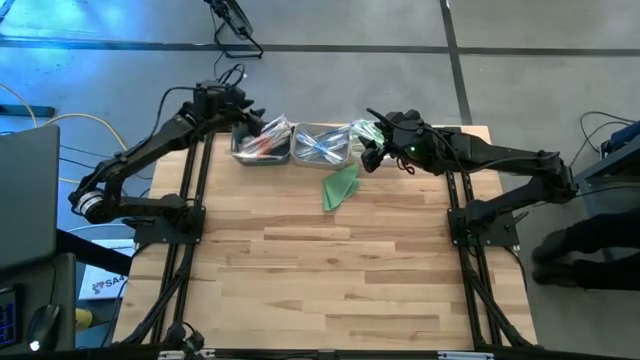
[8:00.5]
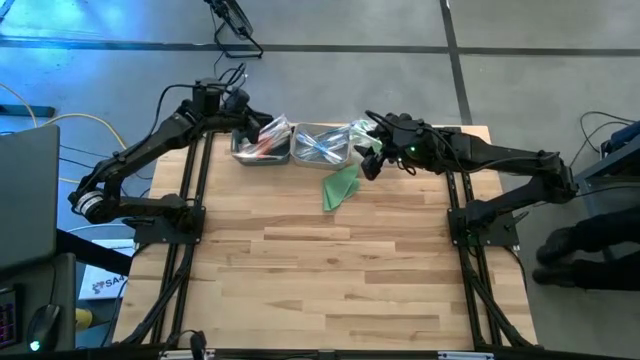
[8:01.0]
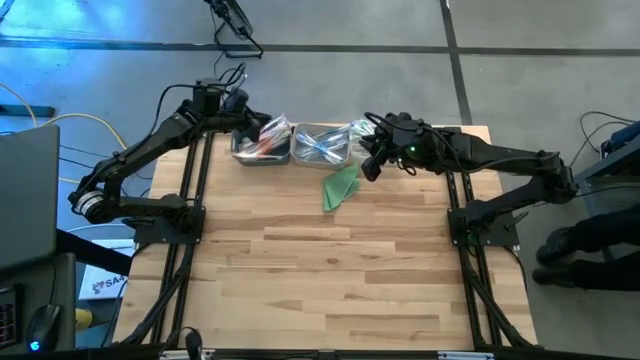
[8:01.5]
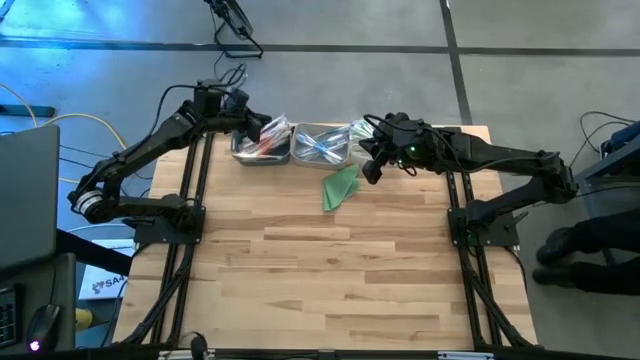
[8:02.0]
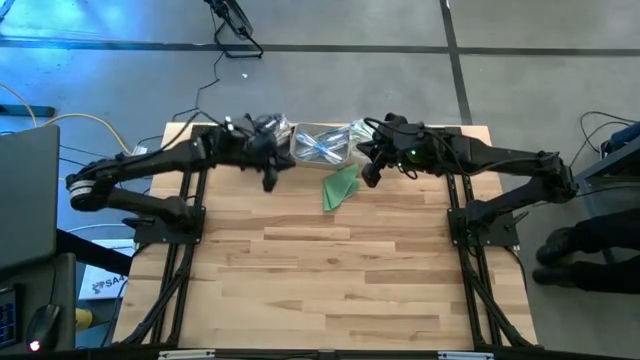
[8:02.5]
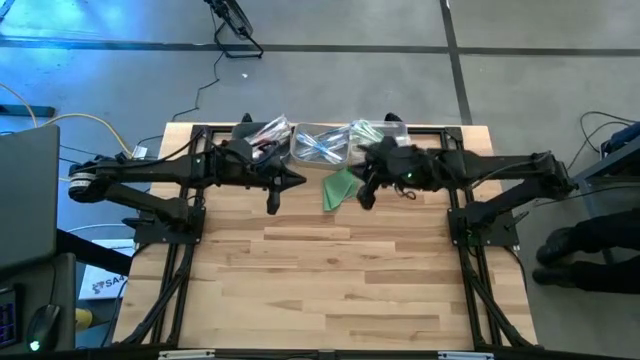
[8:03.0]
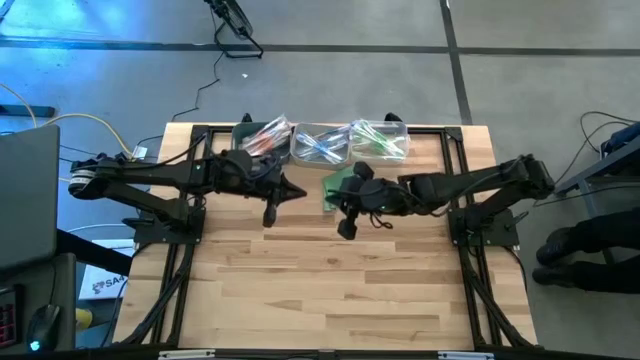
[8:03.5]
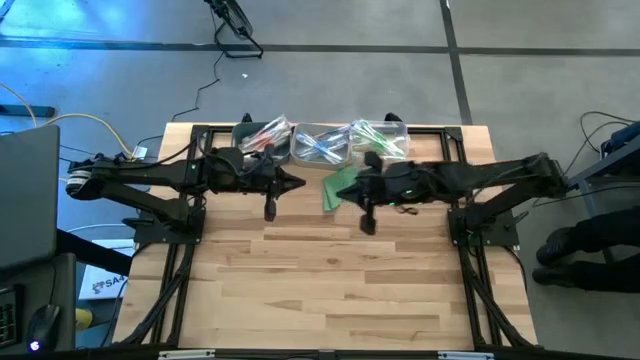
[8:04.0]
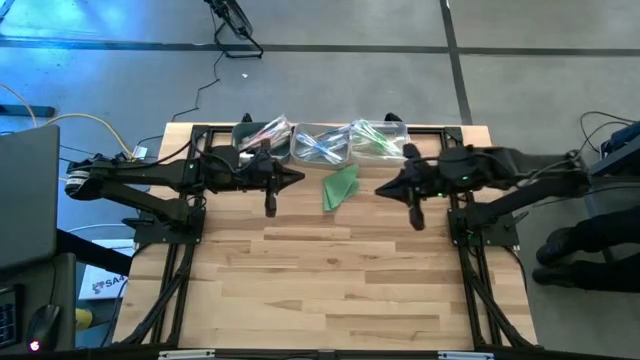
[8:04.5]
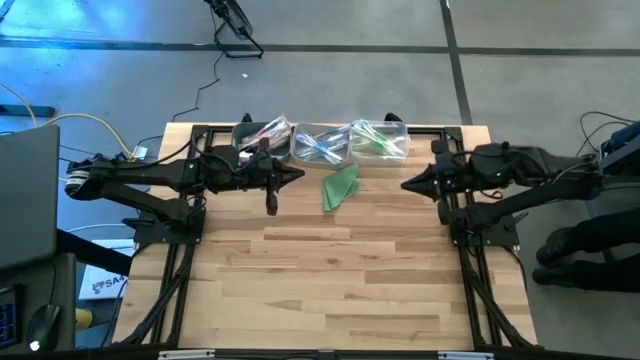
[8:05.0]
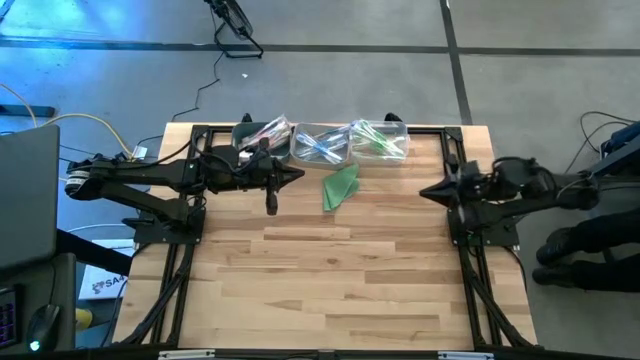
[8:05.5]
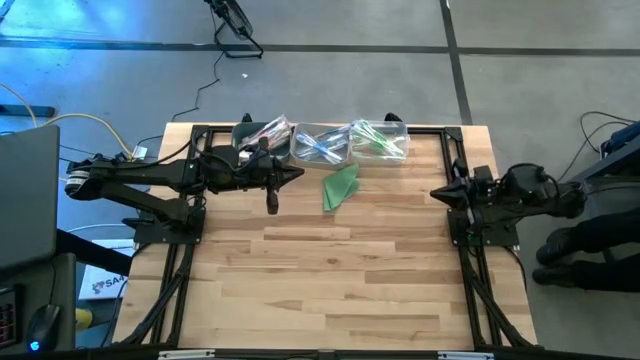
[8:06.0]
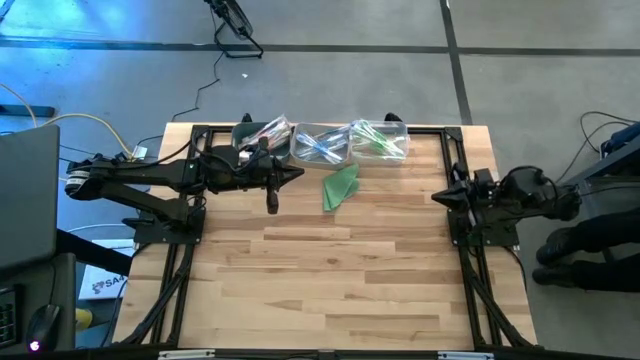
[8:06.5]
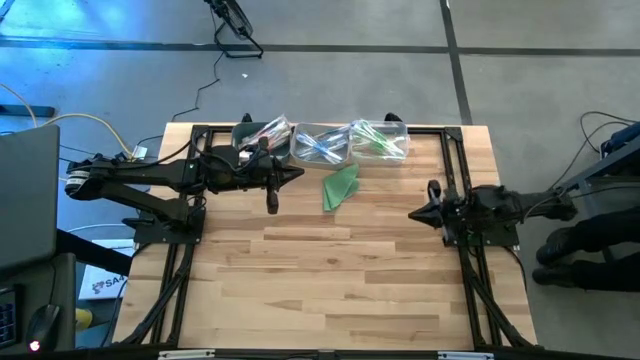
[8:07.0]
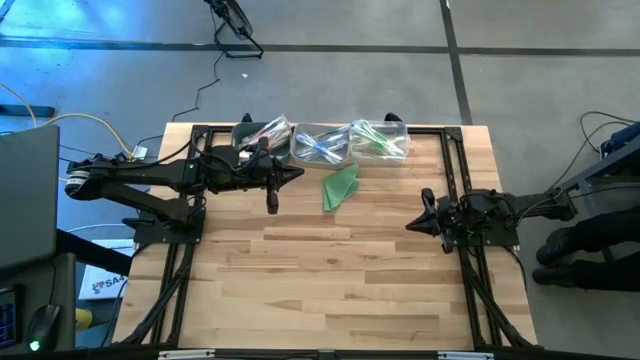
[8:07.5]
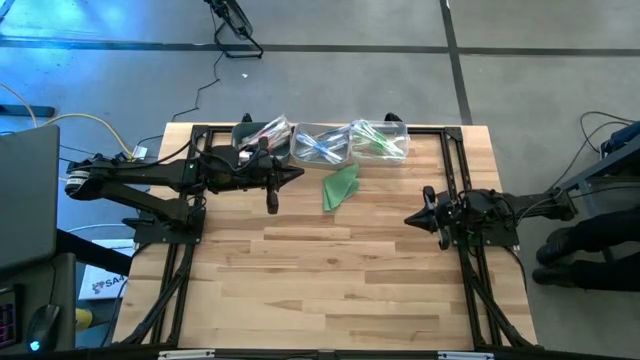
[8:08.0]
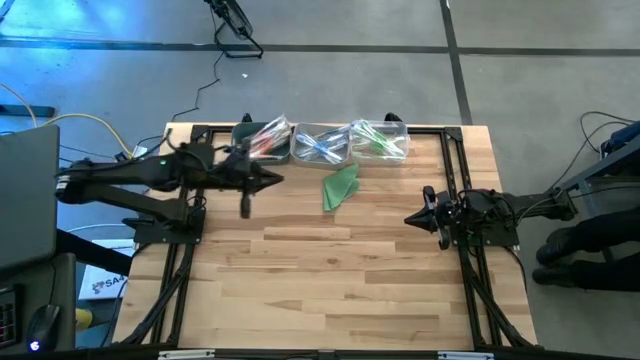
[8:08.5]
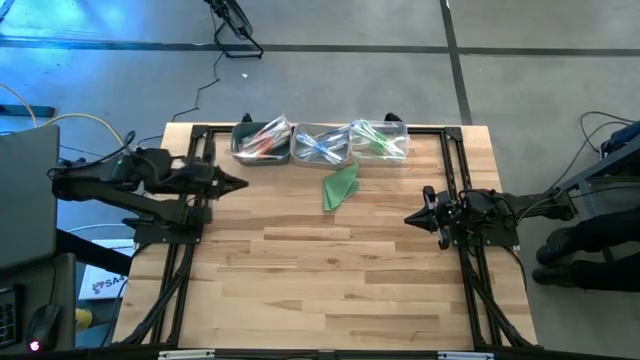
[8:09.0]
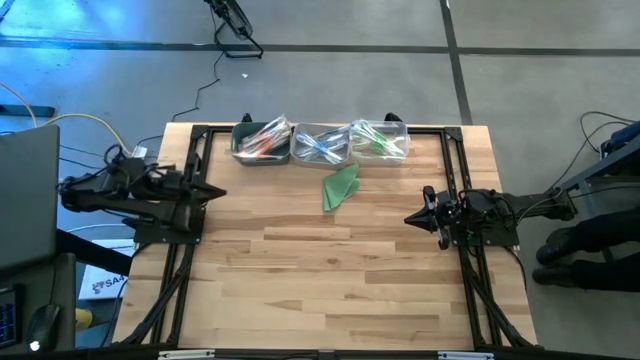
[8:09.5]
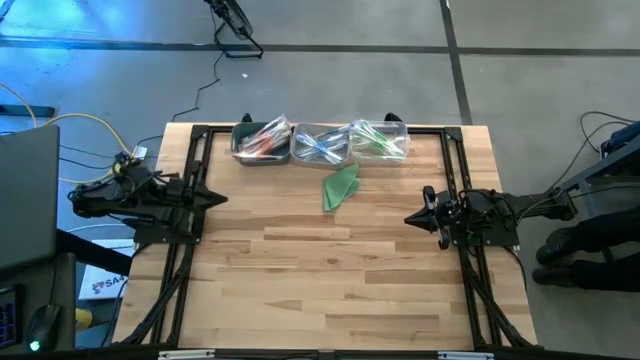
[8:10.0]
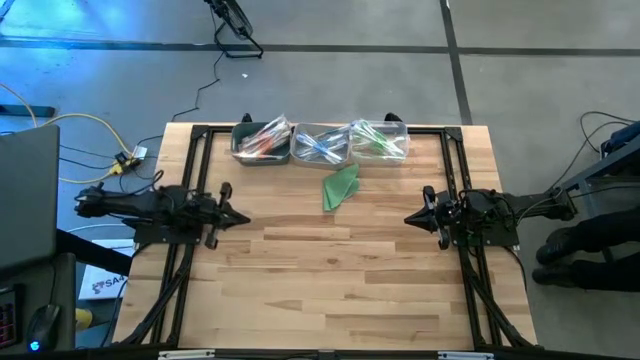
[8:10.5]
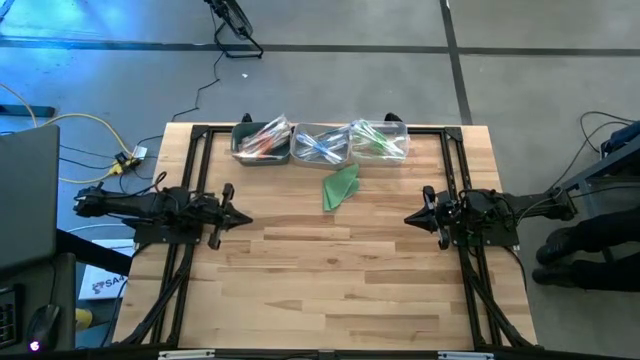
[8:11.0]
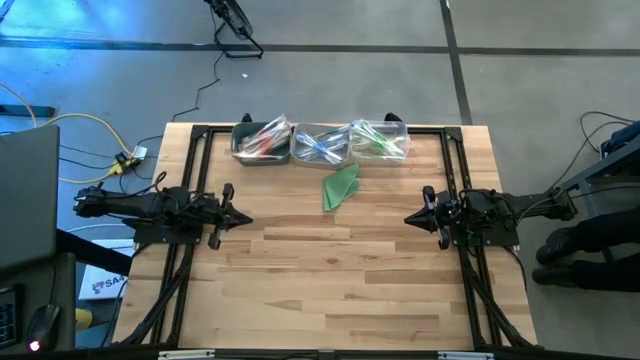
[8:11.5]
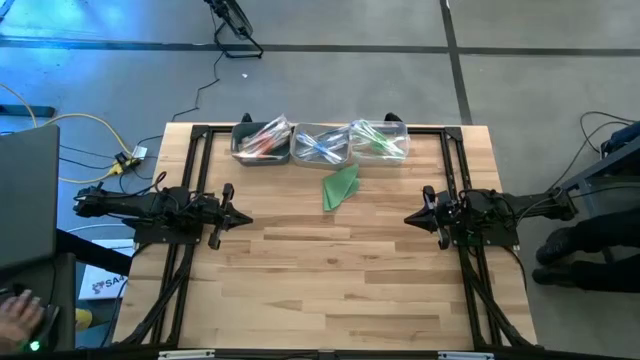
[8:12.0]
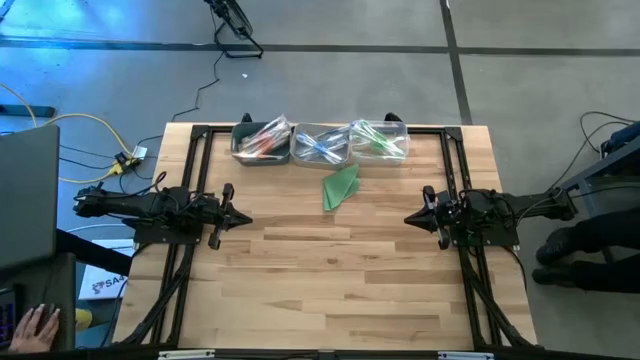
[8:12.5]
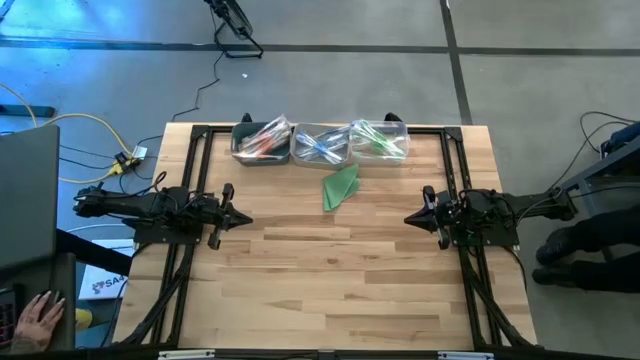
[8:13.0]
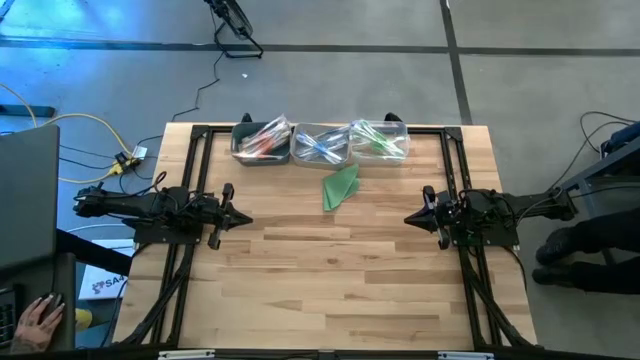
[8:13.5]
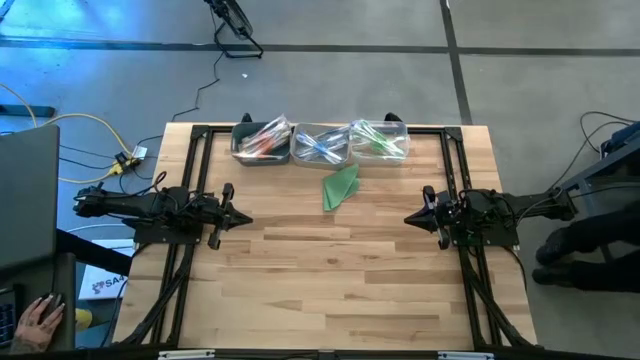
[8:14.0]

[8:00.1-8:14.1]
Task: Pick & Place Toothbrushes
Return to Home Position

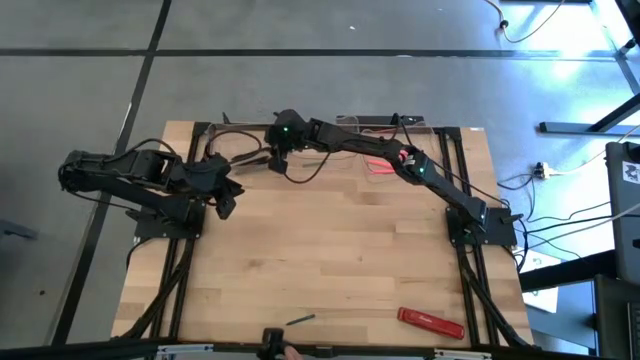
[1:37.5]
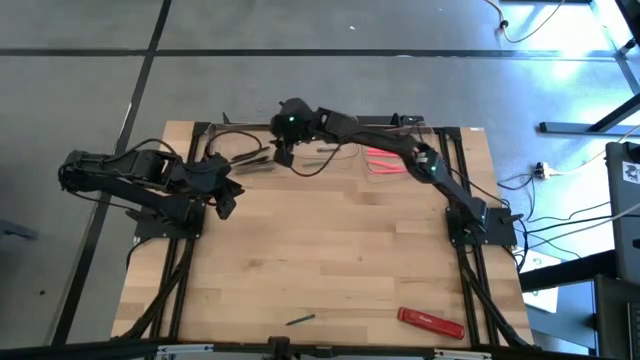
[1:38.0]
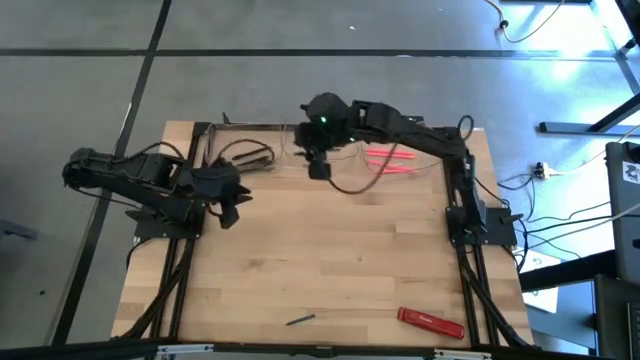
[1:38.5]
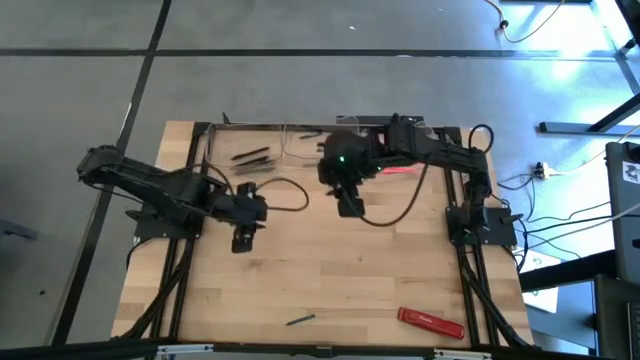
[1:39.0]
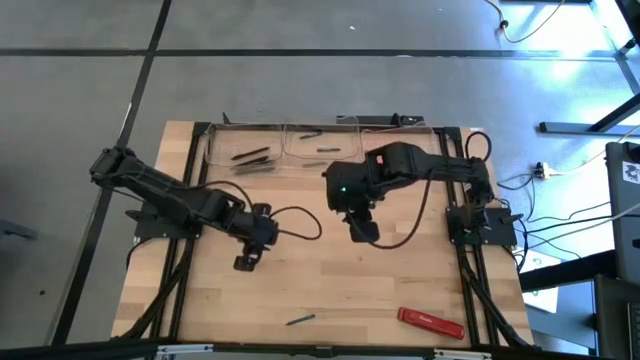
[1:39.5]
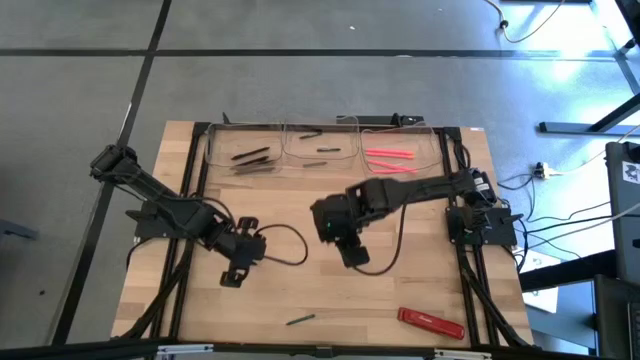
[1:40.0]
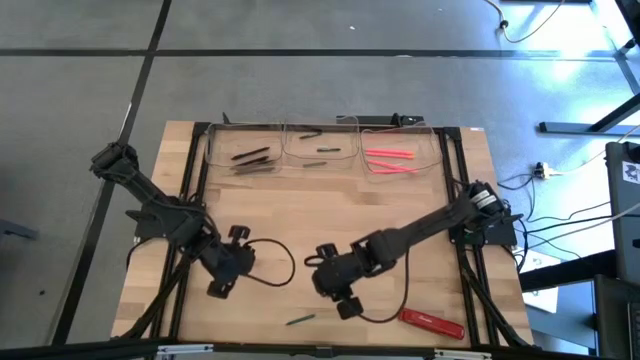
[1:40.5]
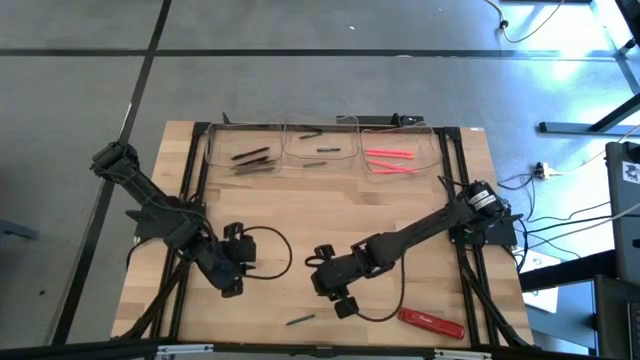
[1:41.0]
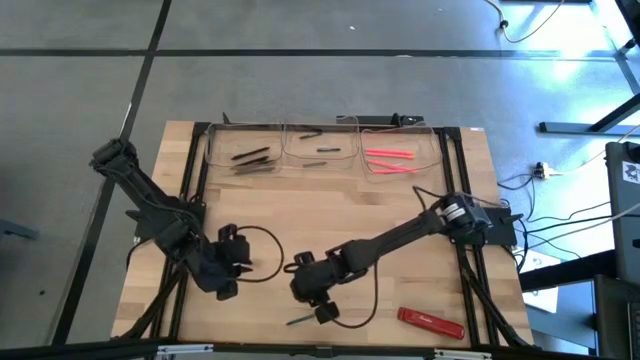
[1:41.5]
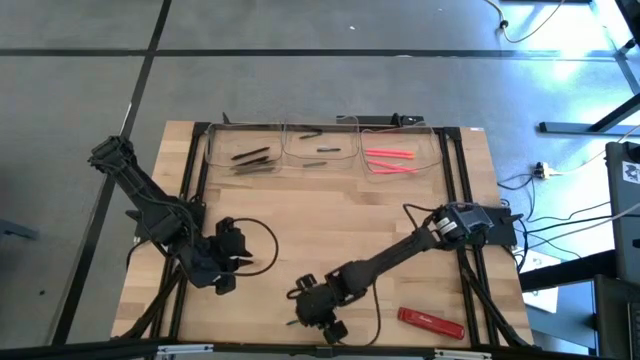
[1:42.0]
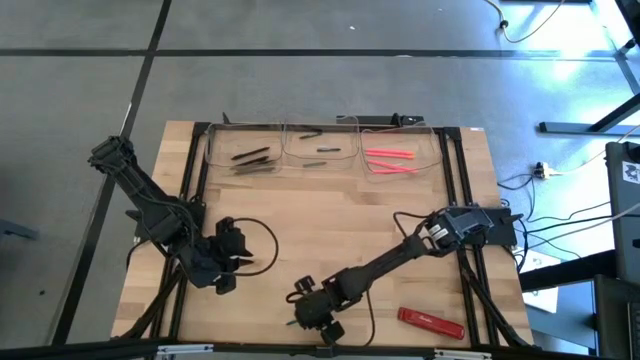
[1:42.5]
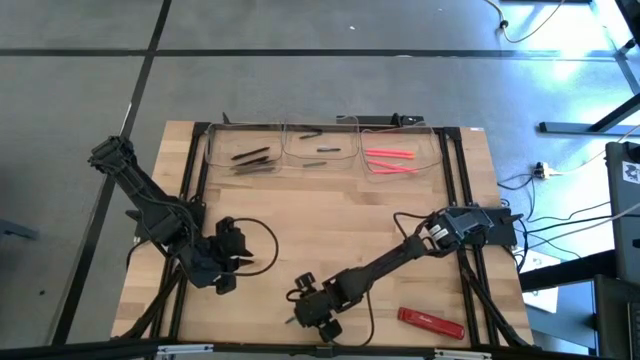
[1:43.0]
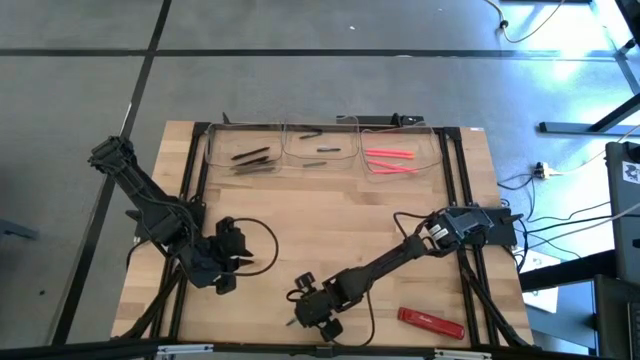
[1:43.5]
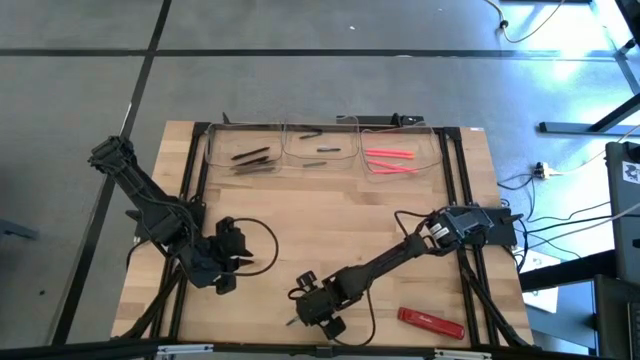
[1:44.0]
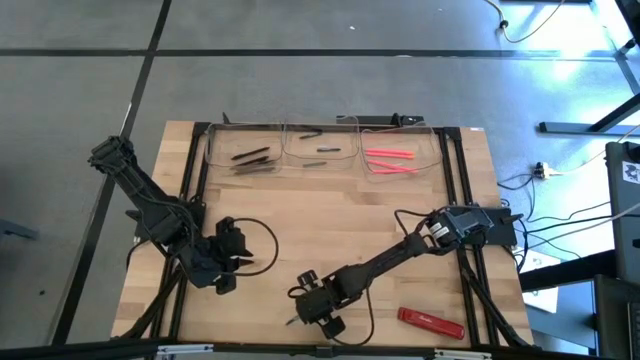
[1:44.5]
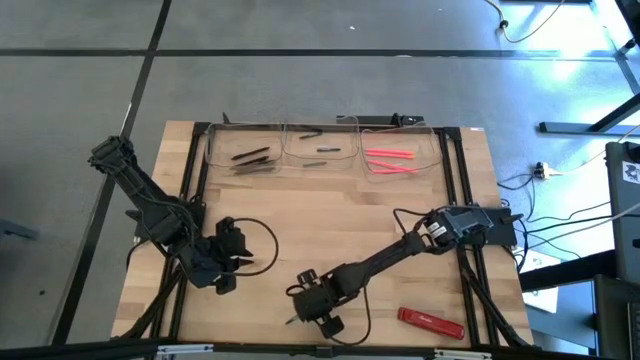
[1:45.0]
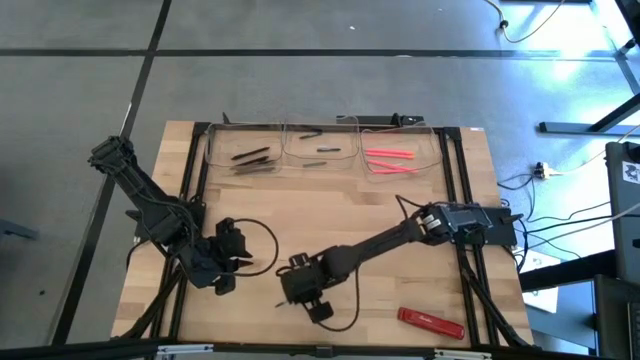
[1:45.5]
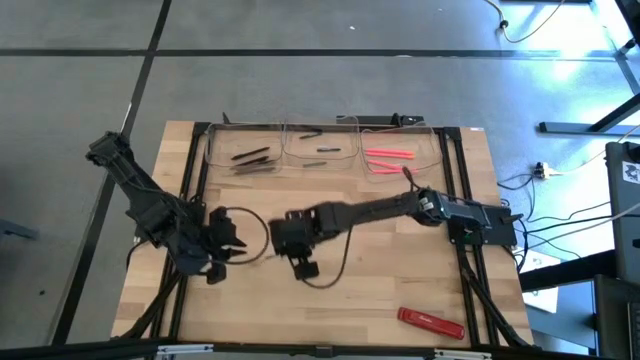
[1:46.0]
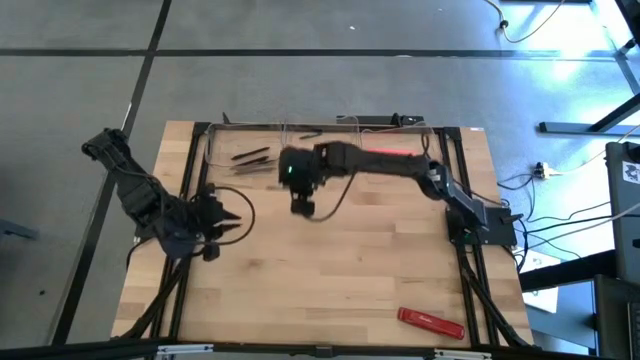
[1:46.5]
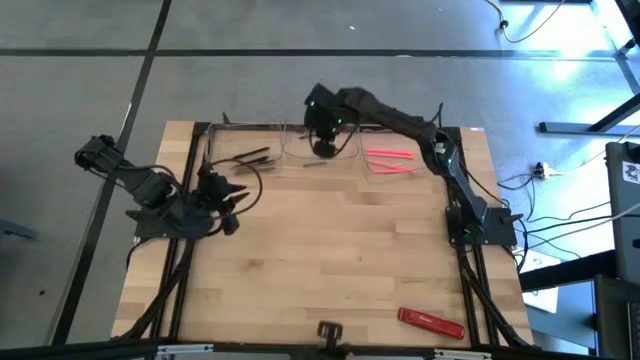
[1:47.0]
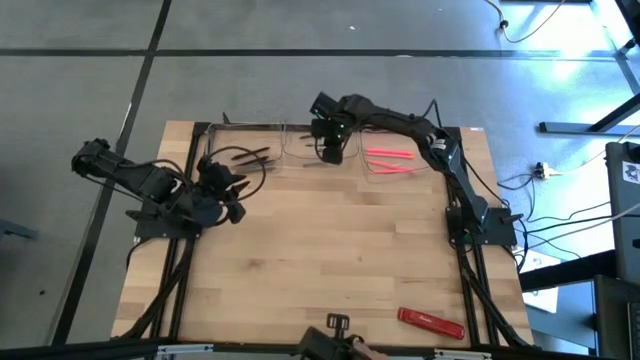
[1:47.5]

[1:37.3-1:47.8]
Task: Sort crayons/erasers/pens/pencils in bins
Put the green crayon into the middle transparent bin
